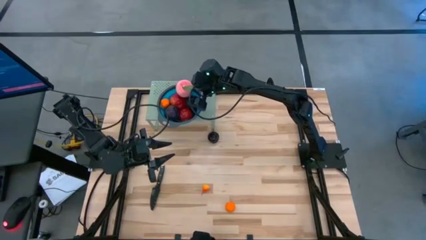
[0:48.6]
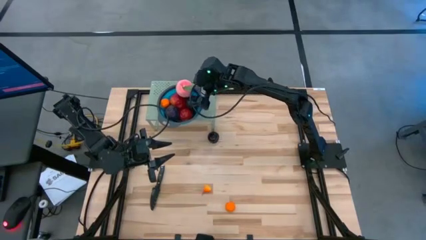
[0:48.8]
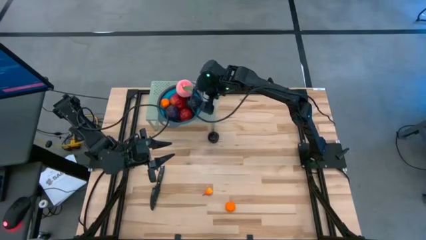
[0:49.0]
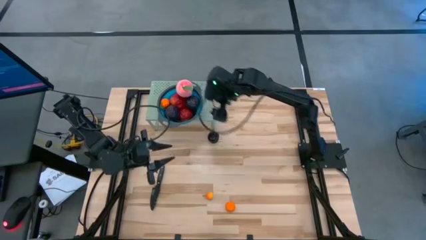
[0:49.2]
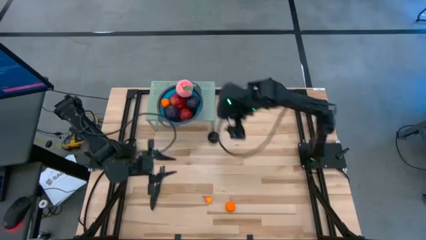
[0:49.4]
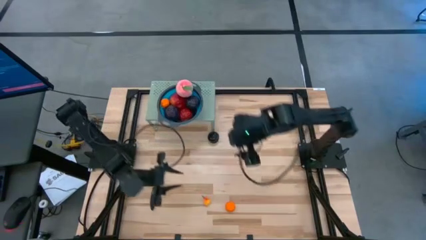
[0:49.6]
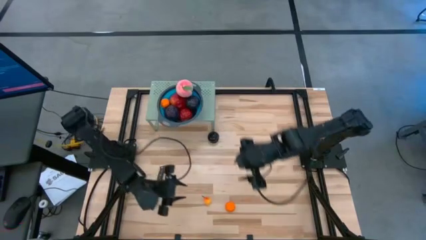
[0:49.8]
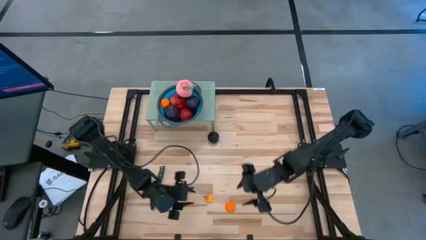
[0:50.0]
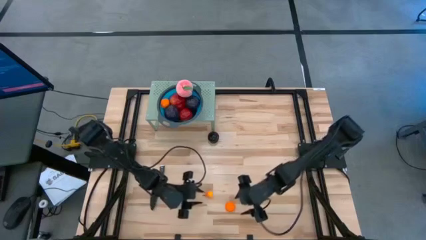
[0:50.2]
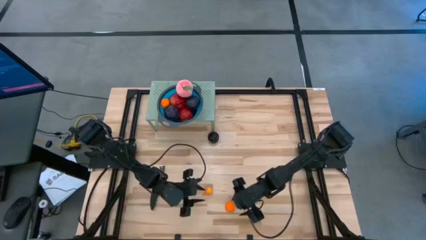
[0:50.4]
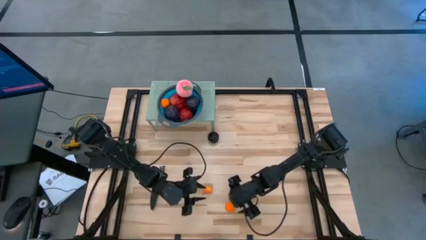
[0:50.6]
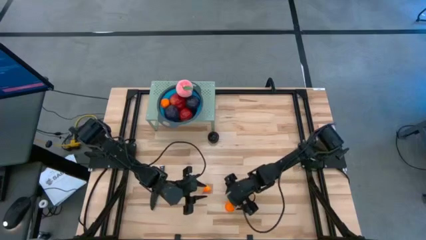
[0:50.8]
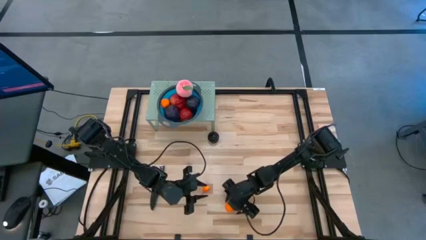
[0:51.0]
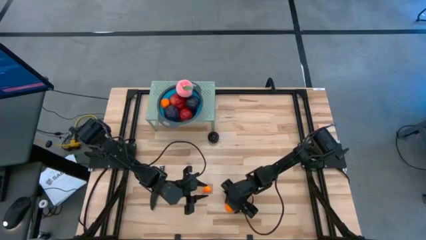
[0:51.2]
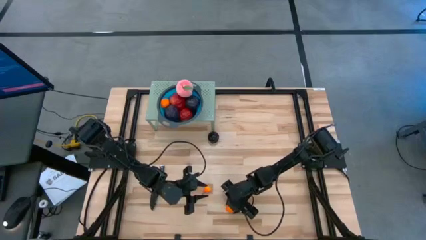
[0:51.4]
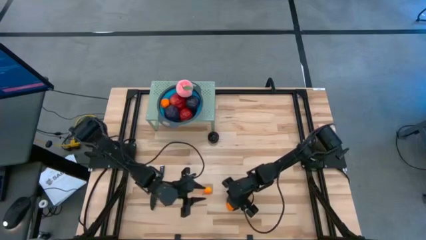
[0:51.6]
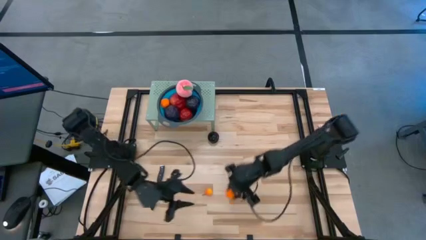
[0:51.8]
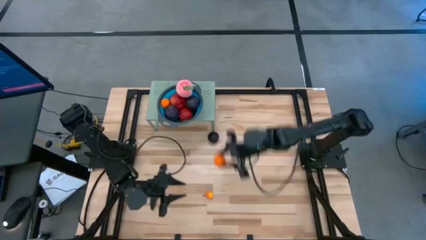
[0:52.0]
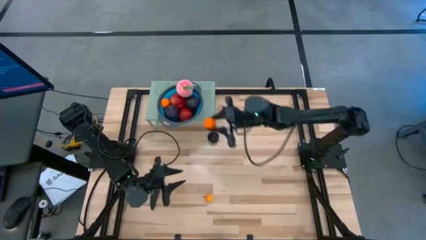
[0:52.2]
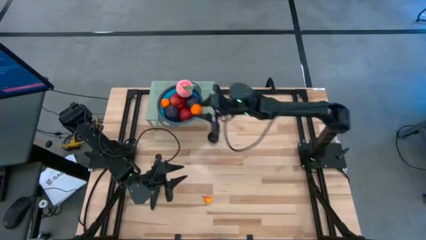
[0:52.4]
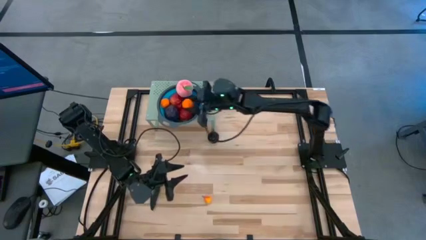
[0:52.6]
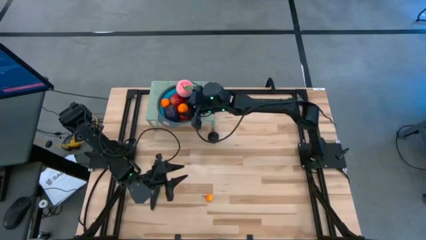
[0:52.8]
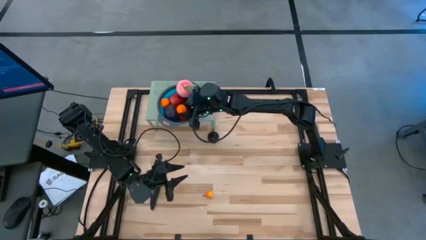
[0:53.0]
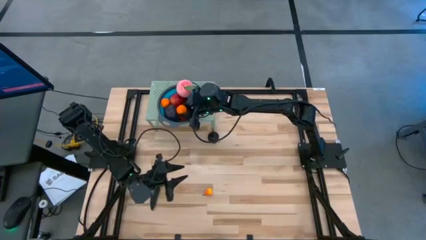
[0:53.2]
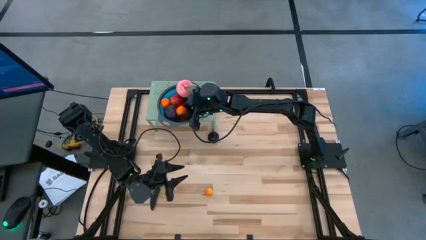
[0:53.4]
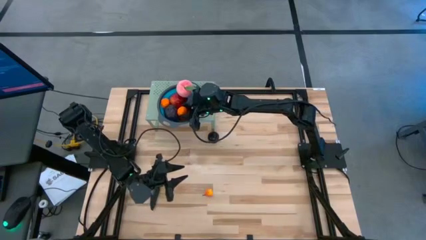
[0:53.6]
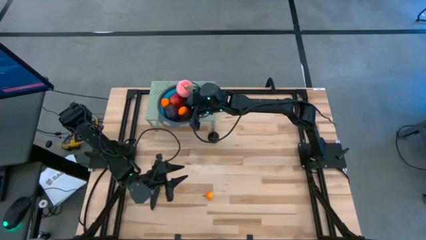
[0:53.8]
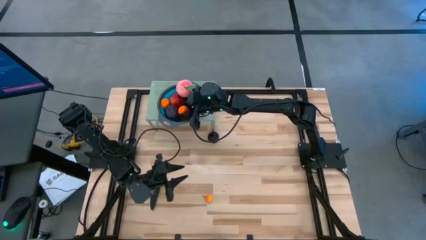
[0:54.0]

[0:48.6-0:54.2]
Task: Pick & Place Fruit
Put the orange into the blue strainer bowl on the shelf

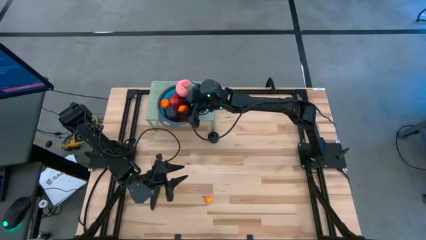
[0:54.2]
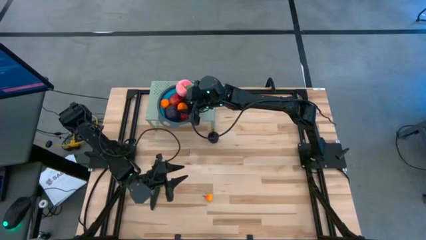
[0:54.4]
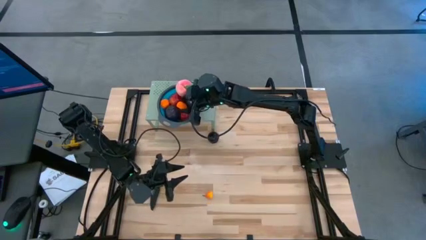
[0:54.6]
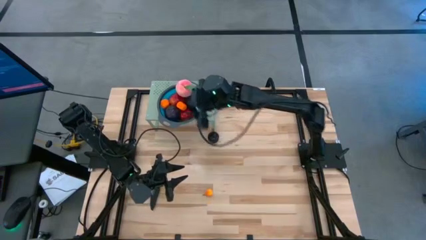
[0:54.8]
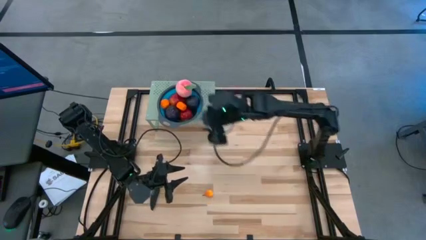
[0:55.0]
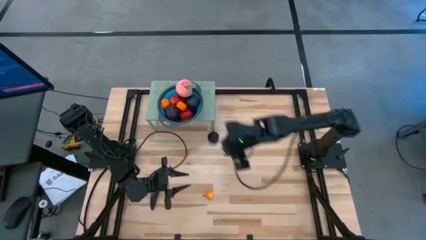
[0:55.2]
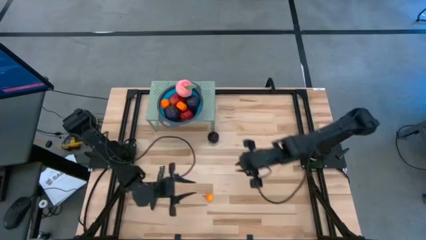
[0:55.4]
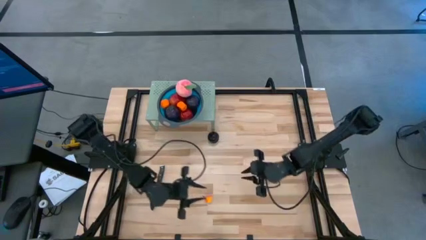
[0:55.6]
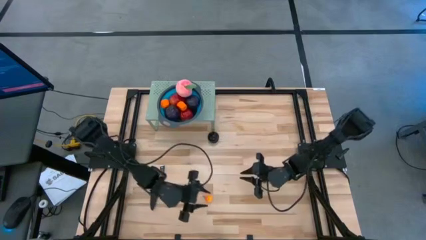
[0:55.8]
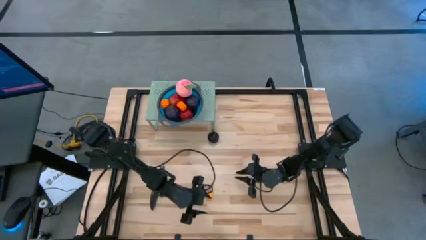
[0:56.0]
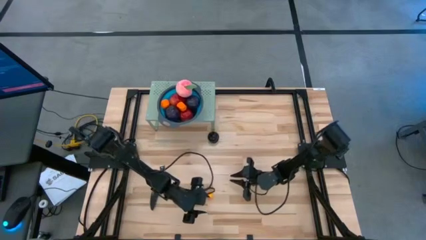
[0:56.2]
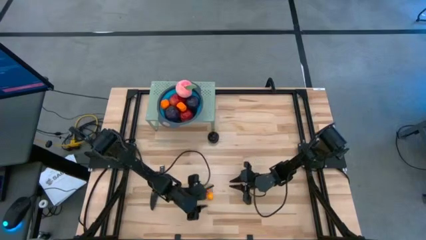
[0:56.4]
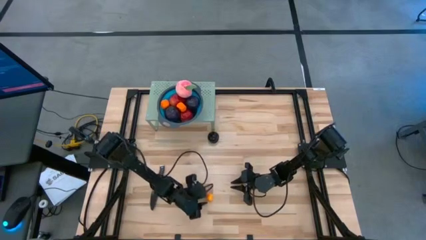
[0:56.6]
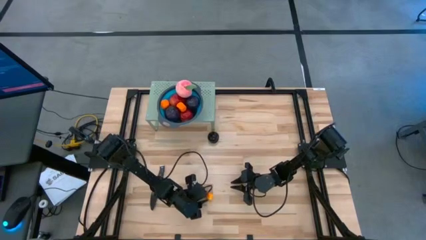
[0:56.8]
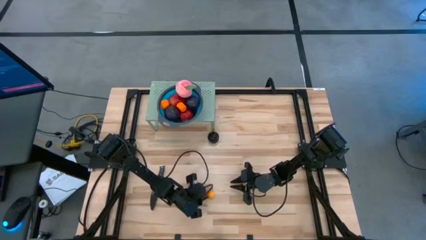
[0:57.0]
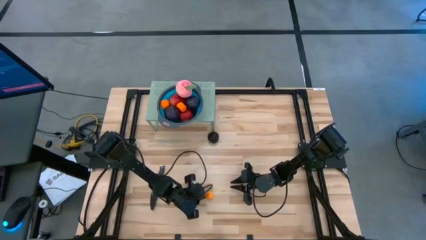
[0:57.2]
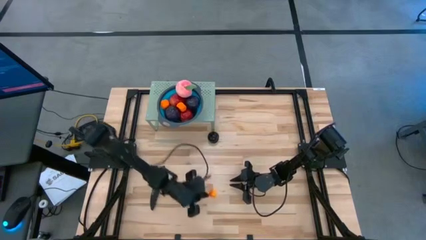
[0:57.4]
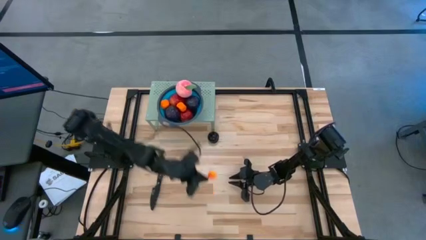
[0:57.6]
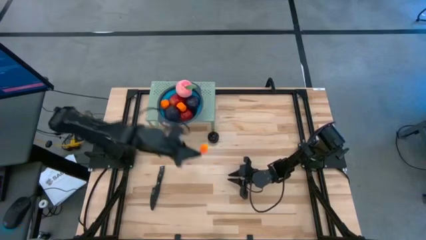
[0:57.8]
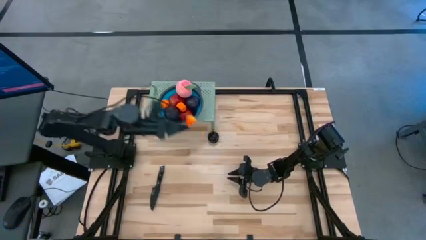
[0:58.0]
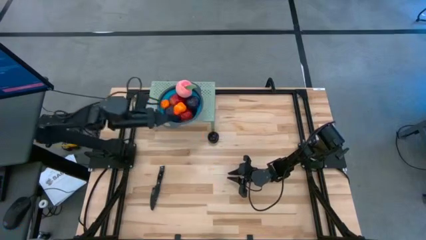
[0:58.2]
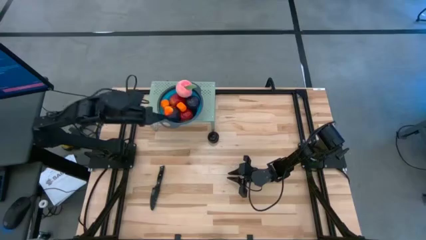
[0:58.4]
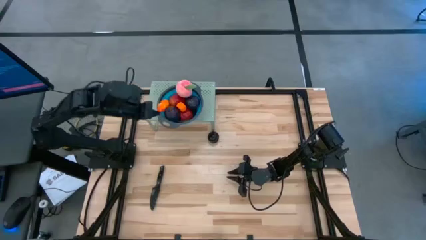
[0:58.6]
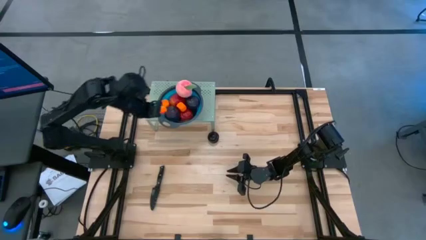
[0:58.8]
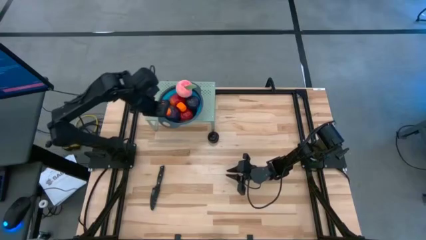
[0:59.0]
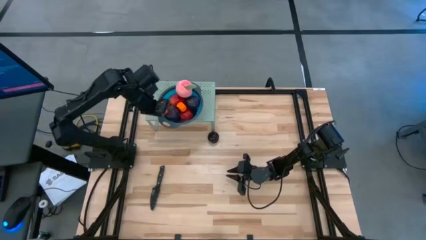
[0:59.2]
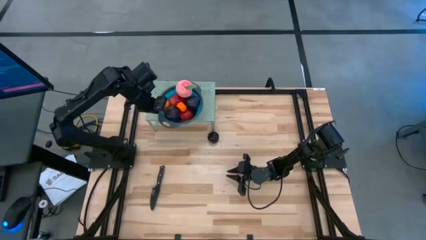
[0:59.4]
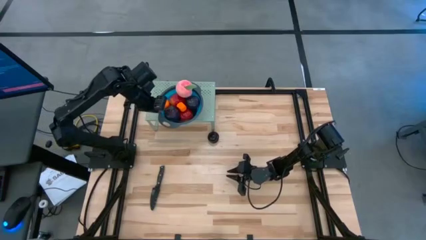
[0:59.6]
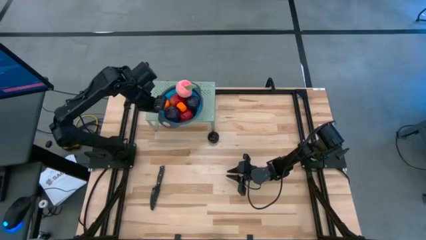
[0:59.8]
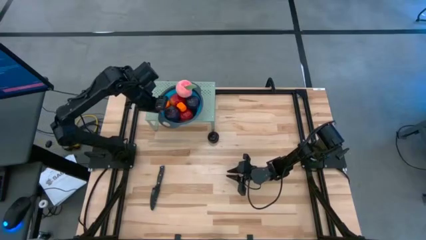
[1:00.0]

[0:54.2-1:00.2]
Put the orange pear into the blue strainer bowl on the shelf

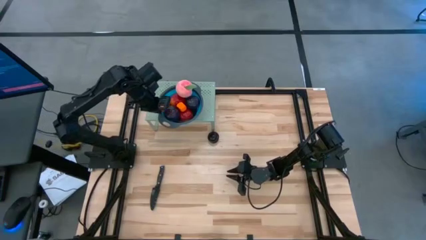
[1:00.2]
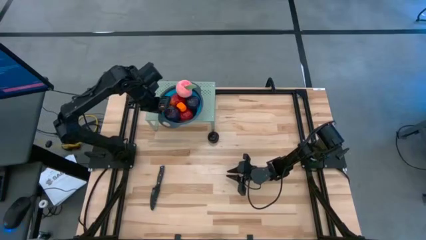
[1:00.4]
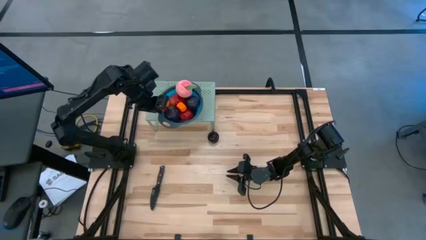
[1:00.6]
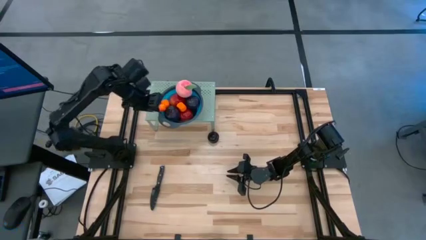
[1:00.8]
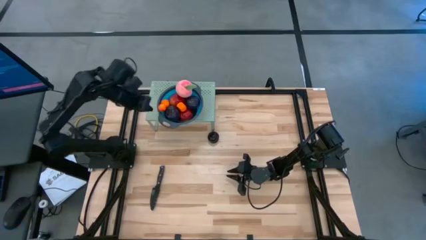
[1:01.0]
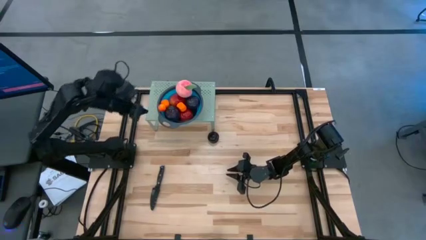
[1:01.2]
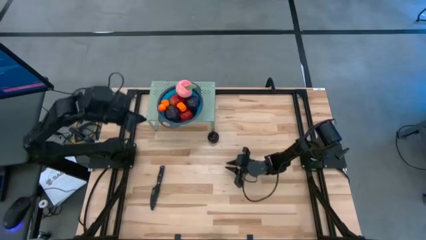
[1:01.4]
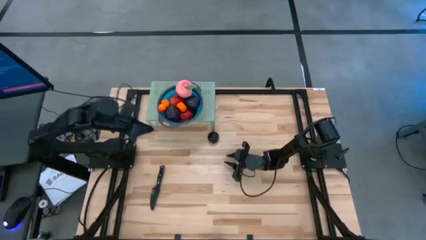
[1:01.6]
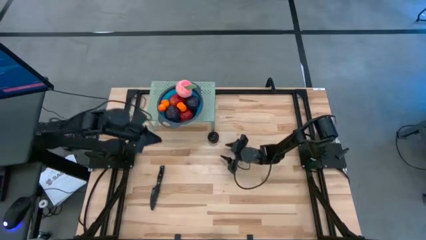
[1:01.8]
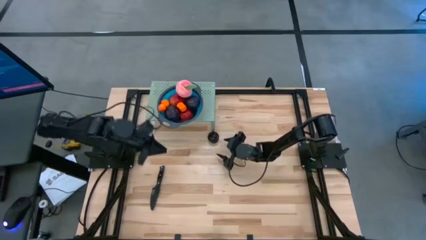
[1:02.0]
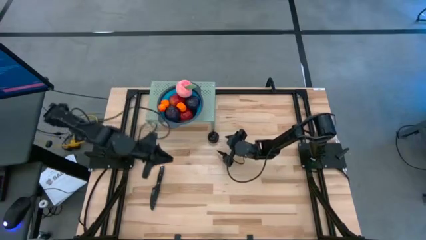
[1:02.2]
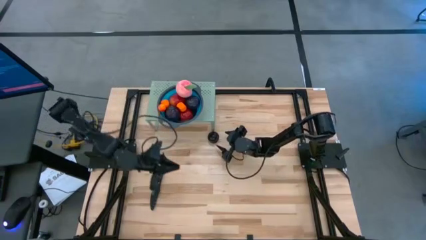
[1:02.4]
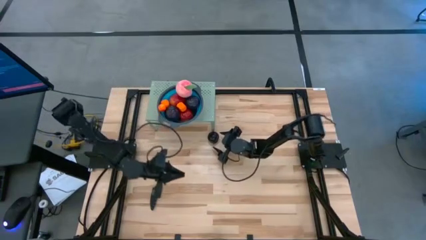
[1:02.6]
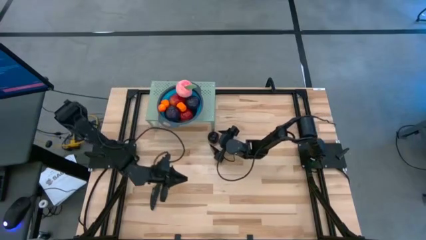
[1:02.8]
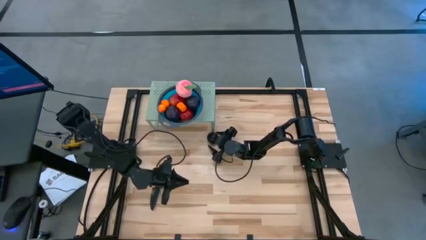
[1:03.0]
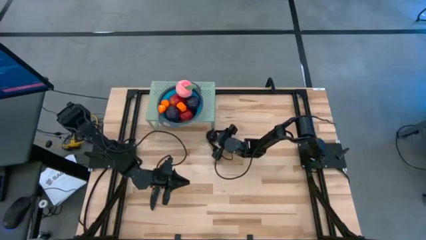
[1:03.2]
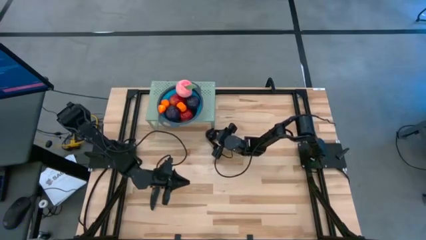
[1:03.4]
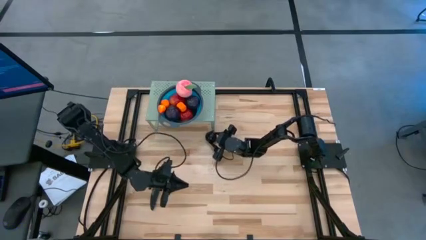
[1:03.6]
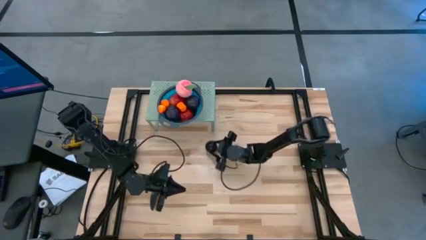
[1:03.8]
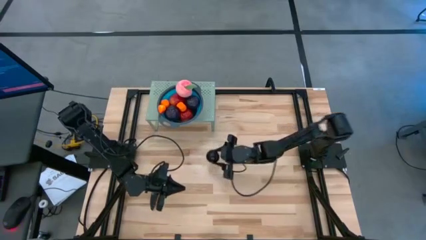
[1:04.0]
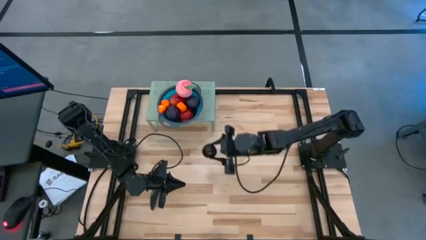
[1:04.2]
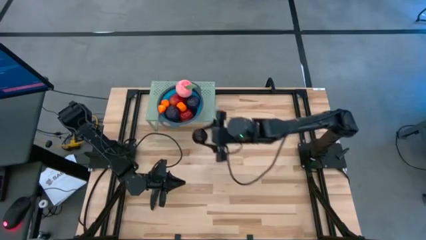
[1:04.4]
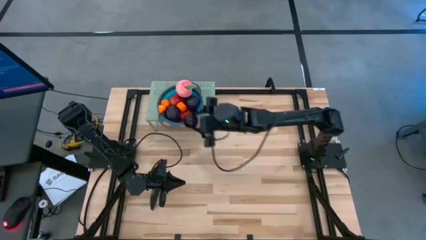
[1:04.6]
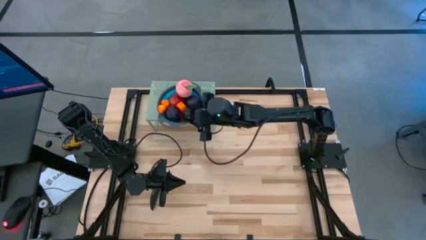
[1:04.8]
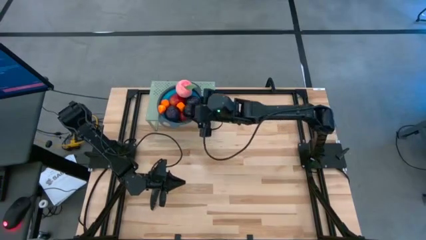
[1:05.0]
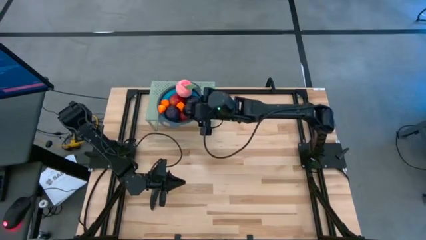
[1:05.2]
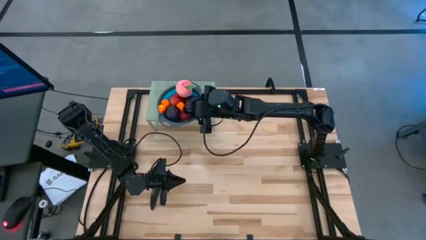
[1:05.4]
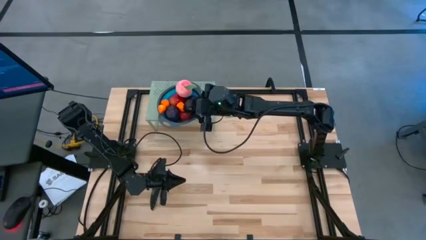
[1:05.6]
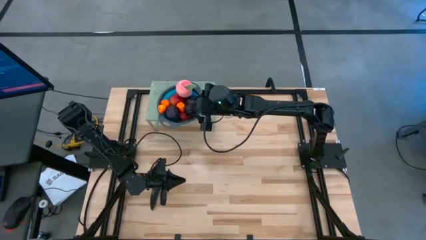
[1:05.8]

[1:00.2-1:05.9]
Put the black plum into the blue strainer bowl on the shelf
